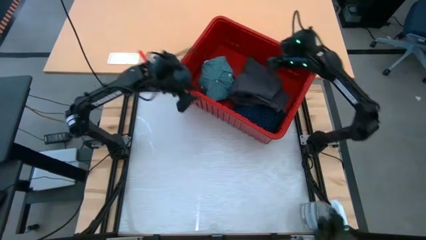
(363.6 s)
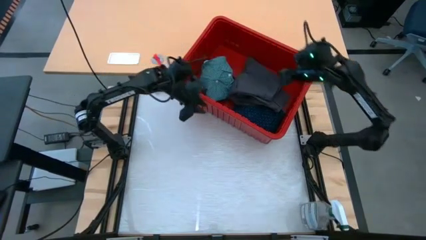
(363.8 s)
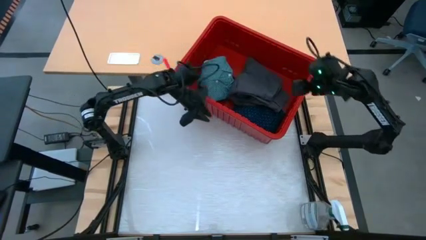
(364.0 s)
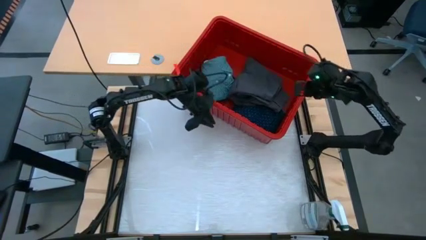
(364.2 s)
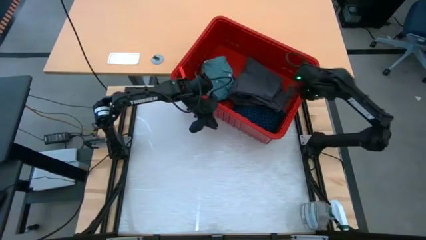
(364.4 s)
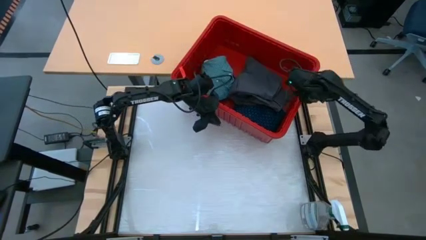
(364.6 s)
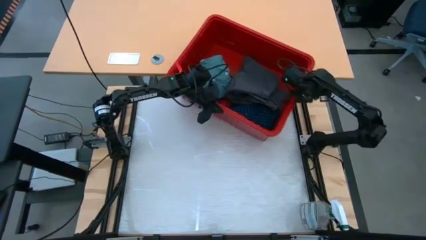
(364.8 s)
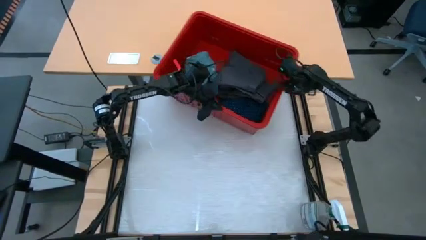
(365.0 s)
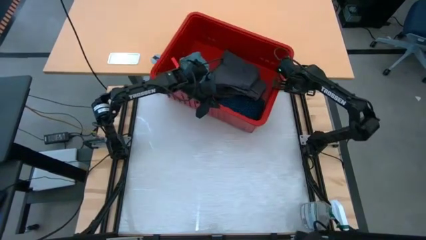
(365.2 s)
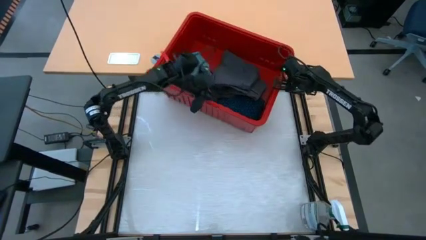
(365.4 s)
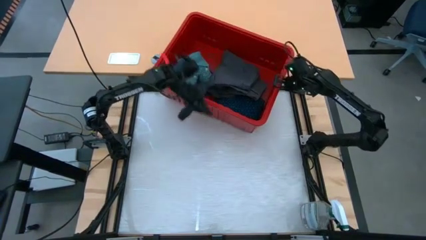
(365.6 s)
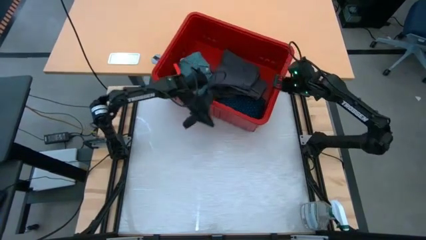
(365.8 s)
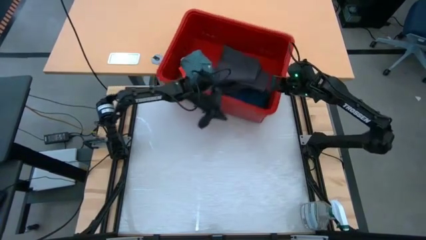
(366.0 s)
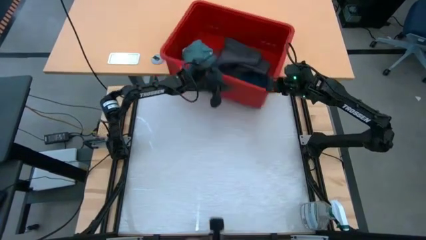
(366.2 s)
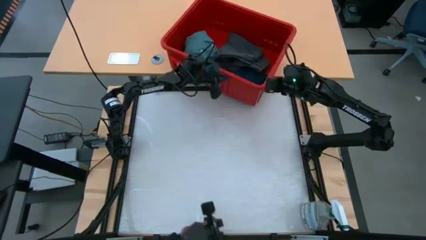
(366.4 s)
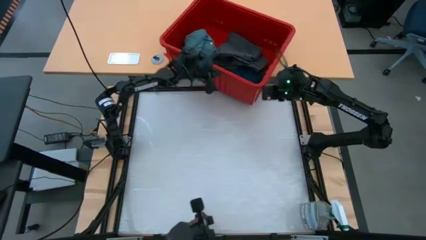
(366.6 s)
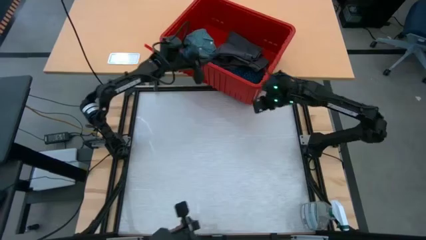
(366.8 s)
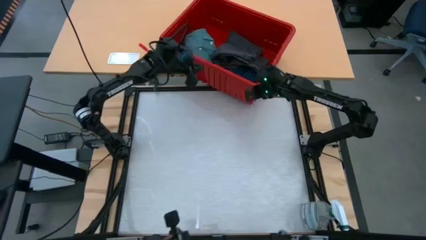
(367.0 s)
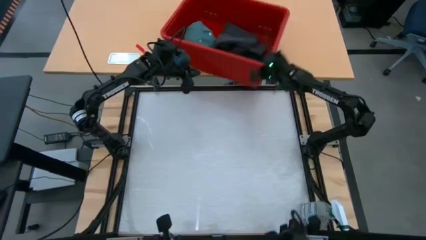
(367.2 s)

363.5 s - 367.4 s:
Task: Fold laundry
Adjust the red bin

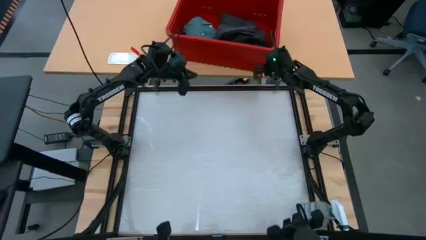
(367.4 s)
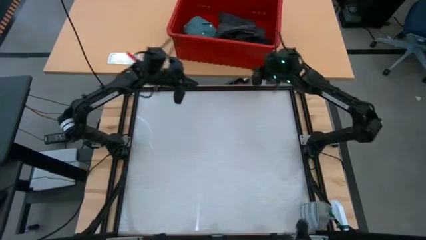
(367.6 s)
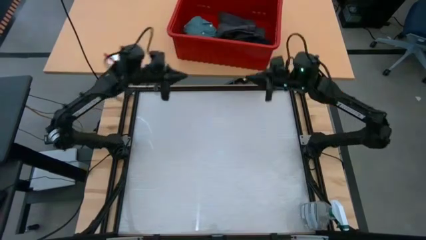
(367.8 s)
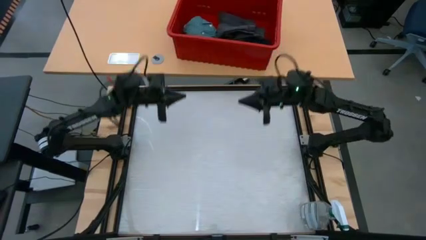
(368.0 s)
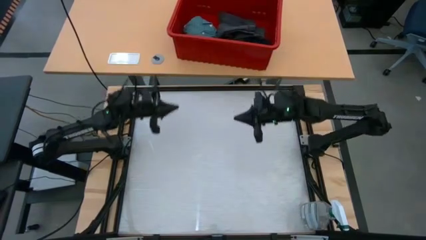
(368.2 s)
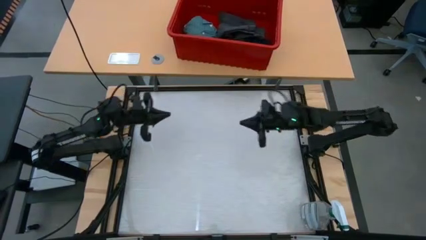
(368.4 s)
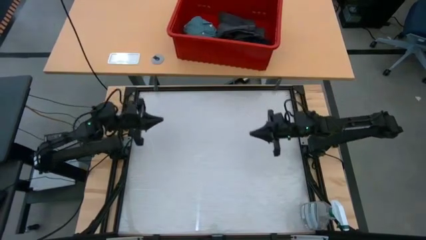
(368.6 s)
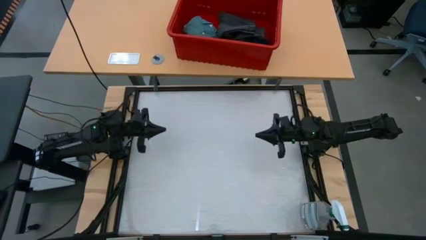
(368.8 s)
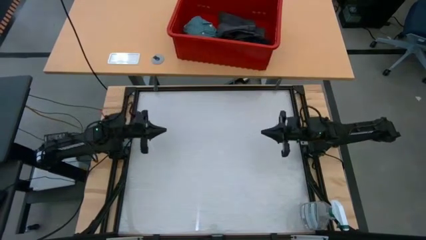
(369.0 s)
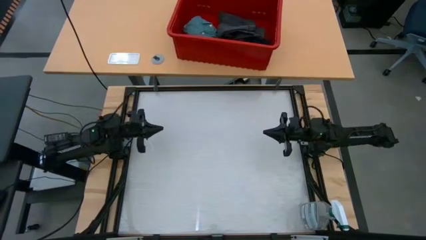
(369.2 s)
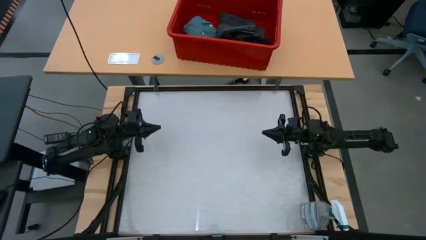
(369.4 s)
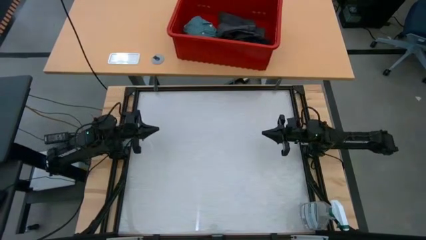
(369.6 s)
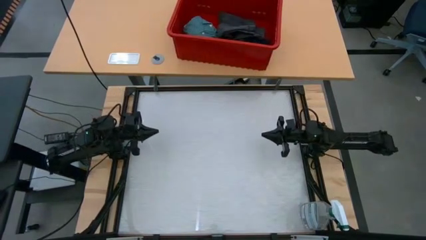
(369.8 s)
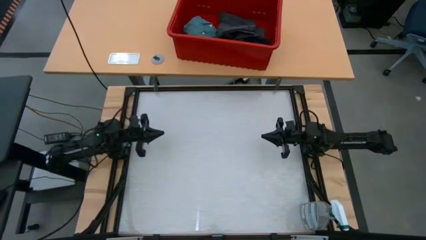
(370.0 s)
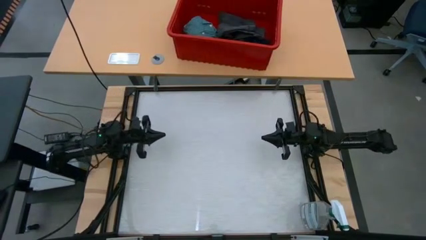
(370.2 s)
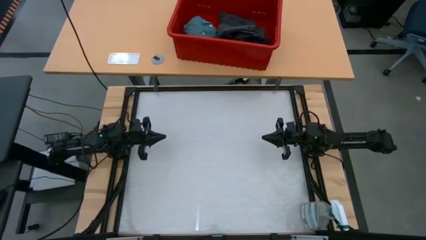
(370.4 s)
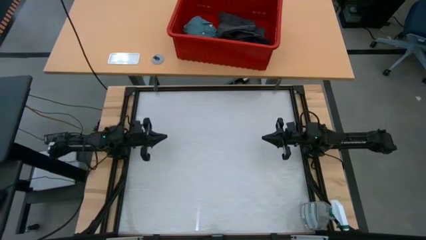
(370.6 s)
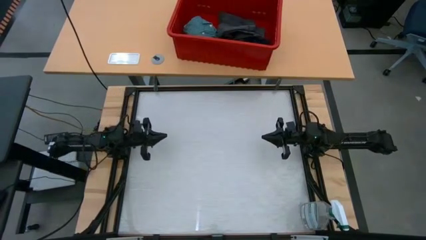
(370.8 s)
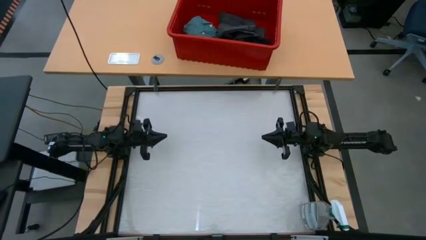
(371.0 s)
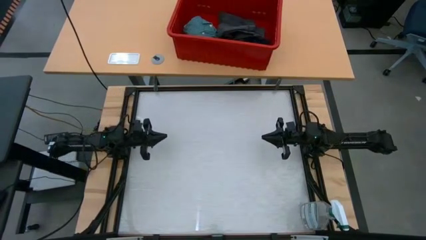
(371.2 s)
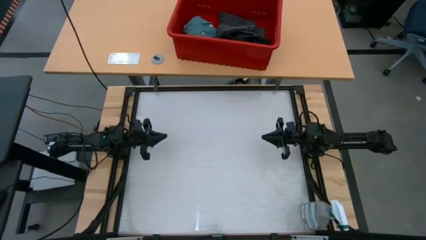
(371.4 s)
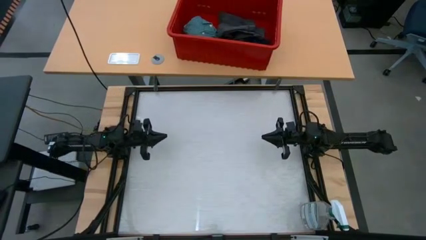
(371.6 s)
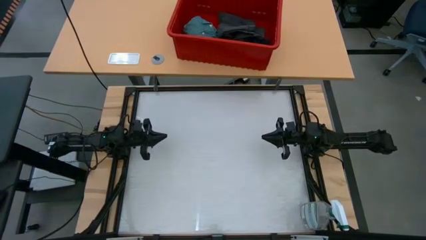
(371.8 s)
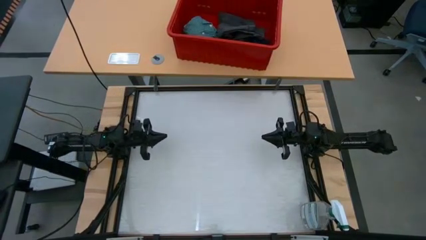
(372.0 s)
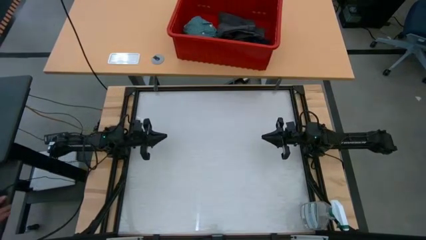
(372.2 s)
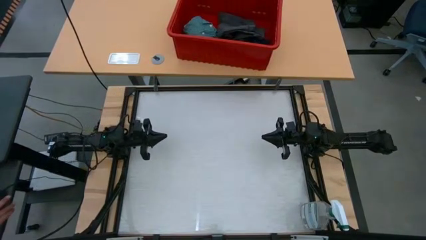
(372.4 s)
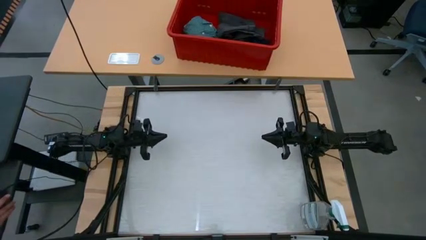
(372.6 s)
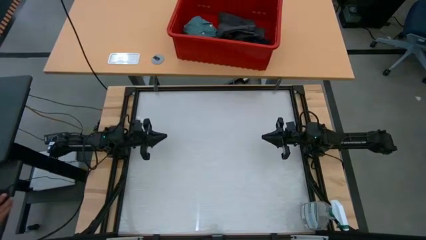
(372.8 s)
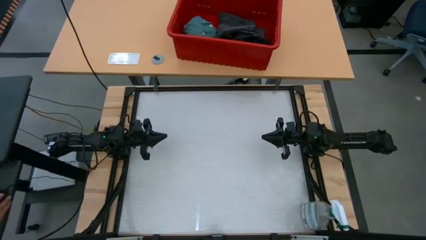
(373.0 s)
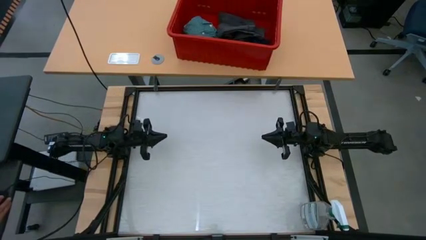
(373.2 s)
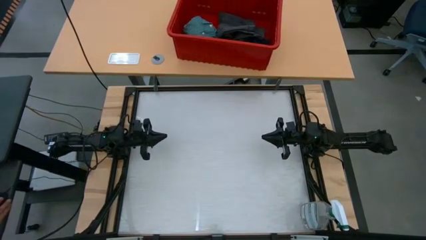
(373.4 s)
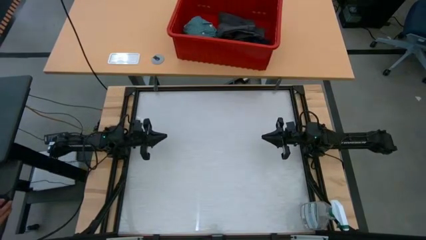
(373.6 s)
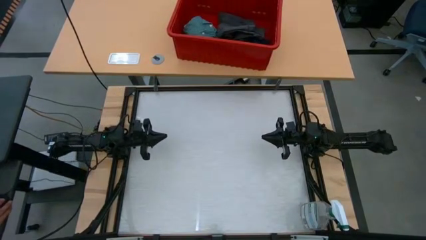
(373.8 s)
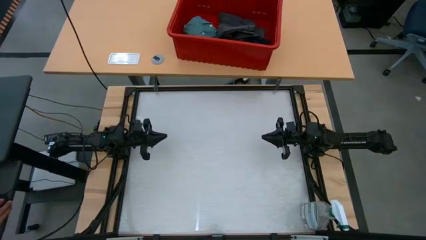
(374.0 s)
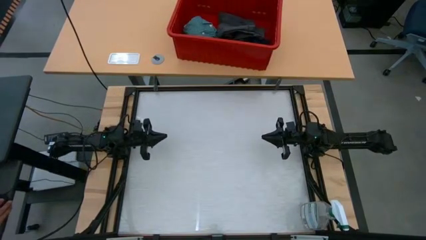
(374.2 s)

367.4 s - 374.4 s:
Return to Home Position

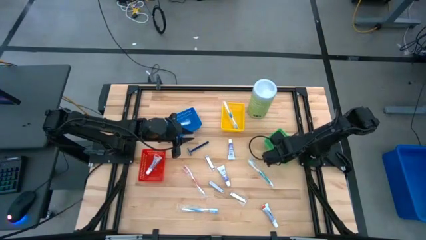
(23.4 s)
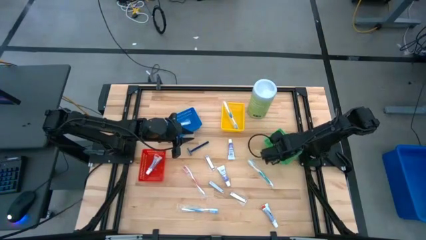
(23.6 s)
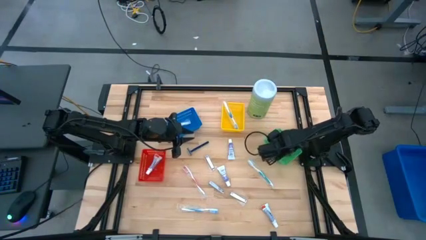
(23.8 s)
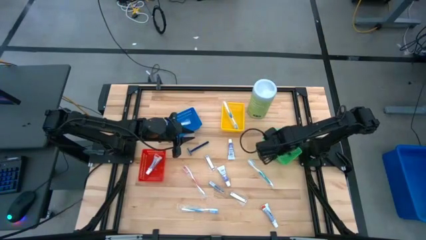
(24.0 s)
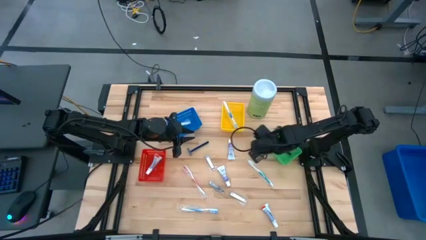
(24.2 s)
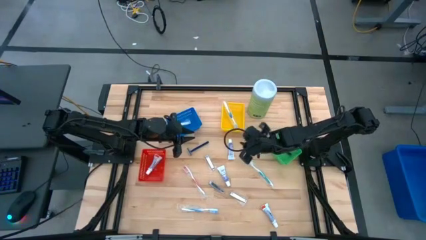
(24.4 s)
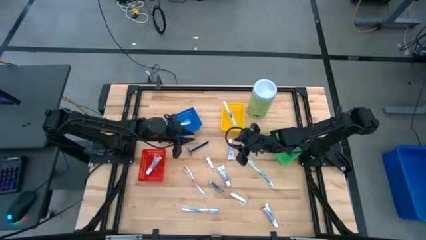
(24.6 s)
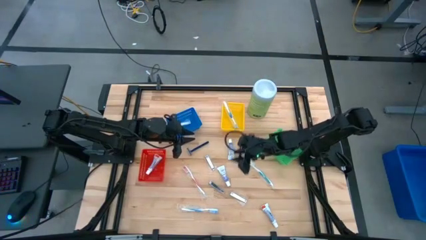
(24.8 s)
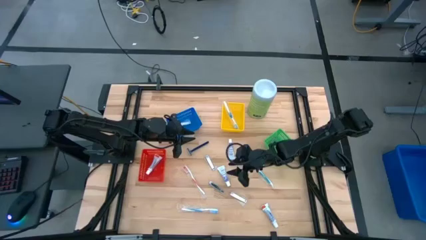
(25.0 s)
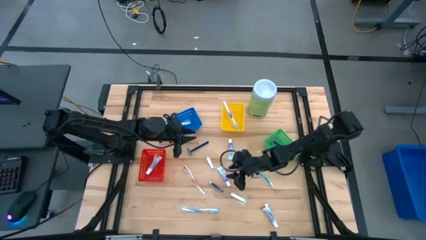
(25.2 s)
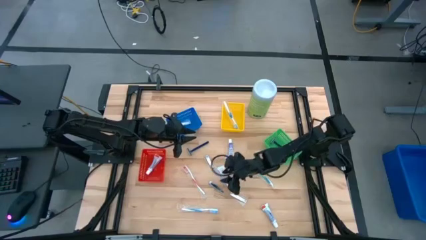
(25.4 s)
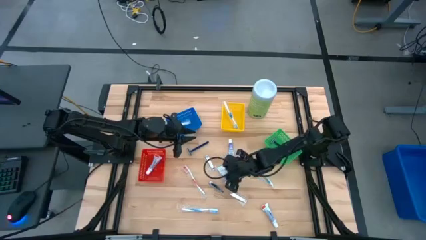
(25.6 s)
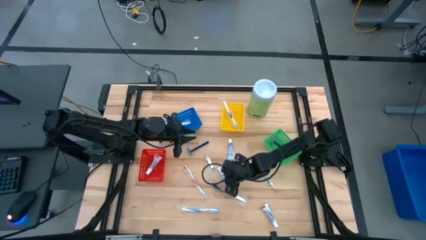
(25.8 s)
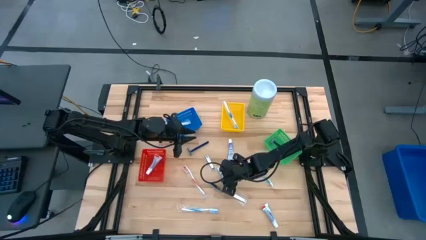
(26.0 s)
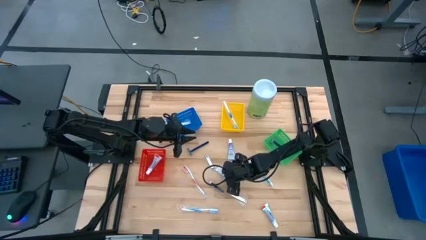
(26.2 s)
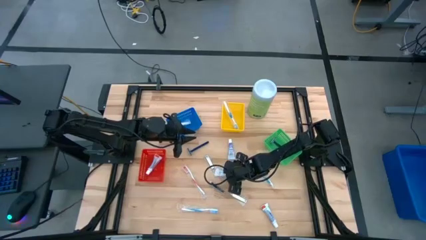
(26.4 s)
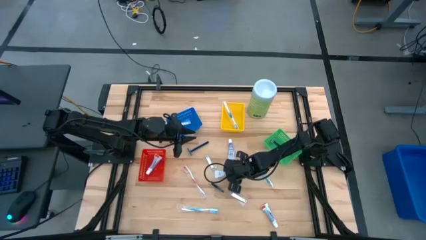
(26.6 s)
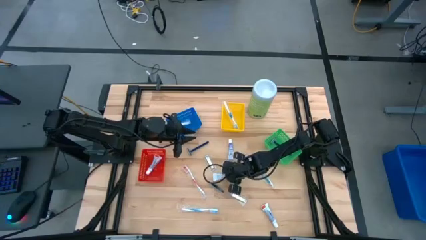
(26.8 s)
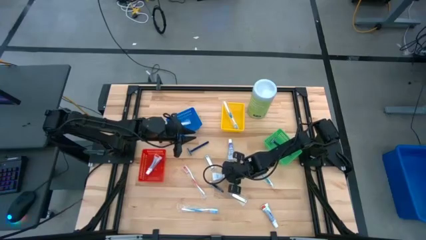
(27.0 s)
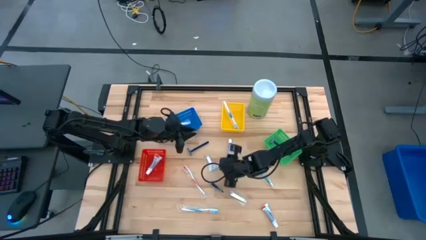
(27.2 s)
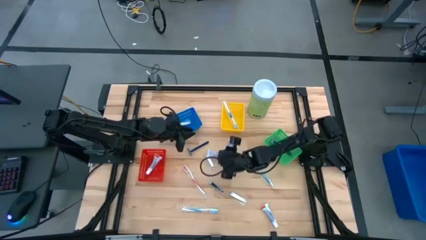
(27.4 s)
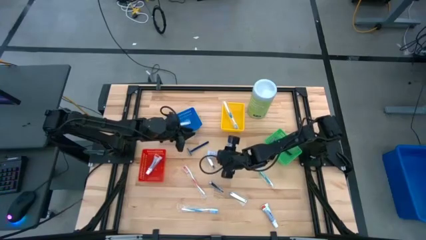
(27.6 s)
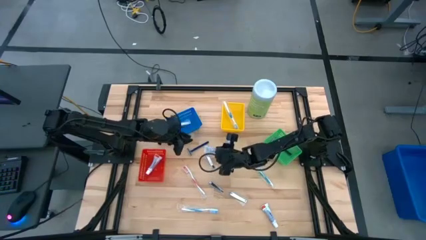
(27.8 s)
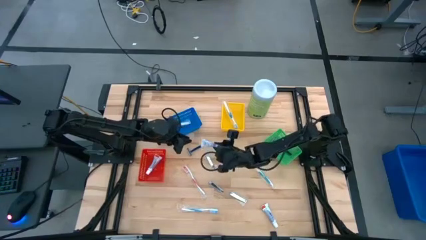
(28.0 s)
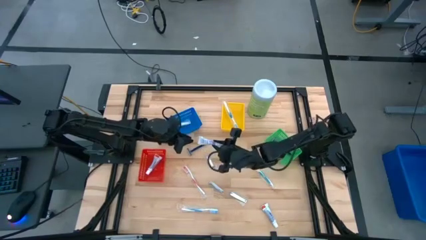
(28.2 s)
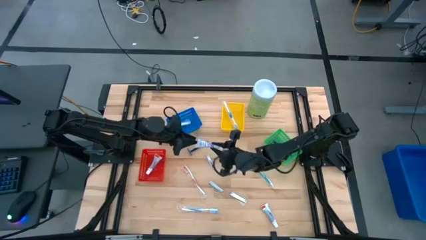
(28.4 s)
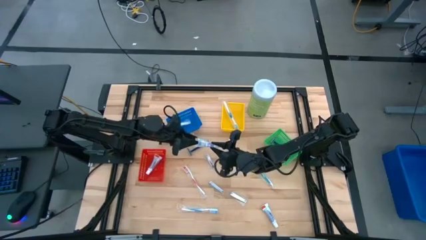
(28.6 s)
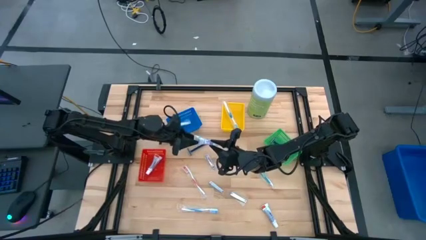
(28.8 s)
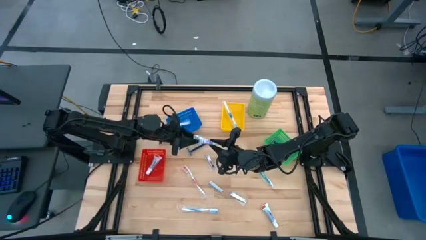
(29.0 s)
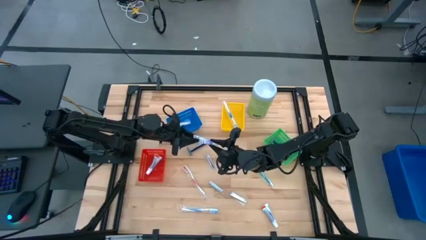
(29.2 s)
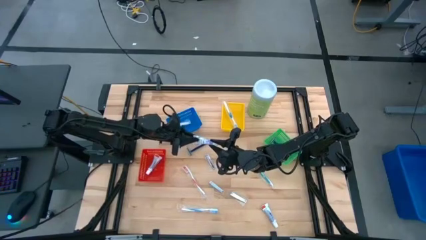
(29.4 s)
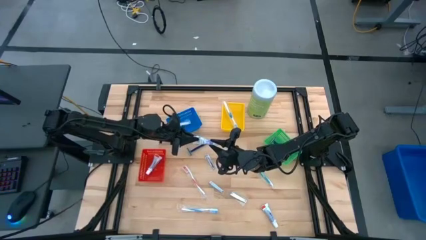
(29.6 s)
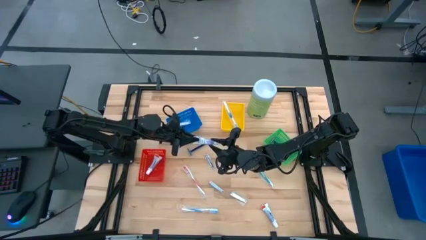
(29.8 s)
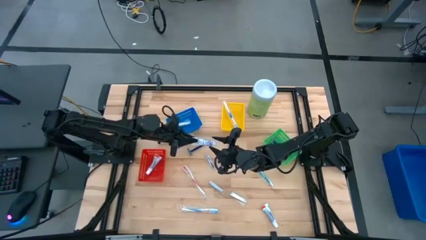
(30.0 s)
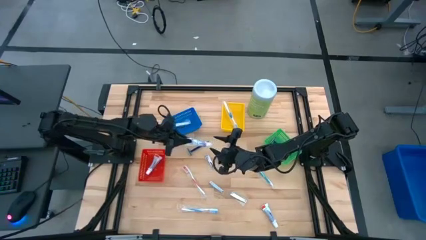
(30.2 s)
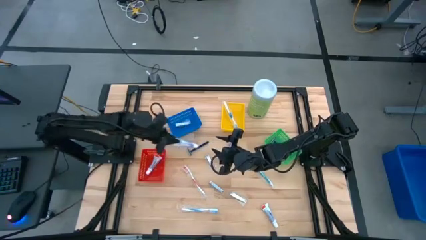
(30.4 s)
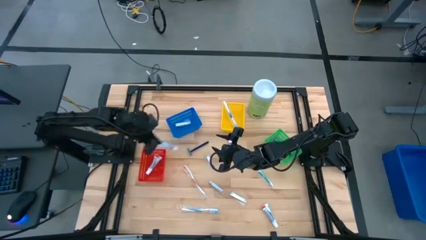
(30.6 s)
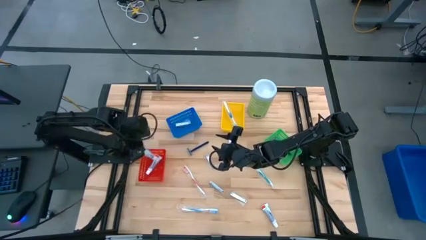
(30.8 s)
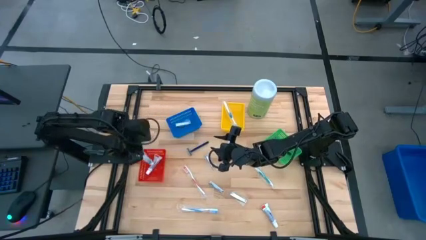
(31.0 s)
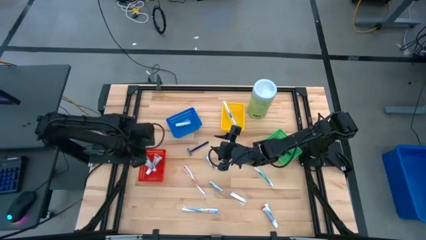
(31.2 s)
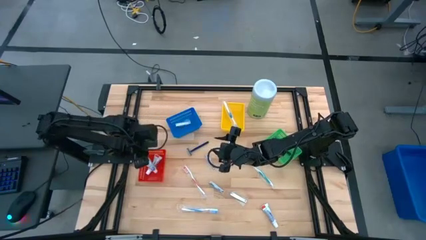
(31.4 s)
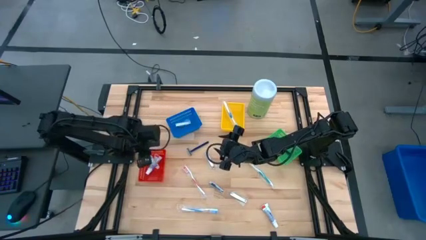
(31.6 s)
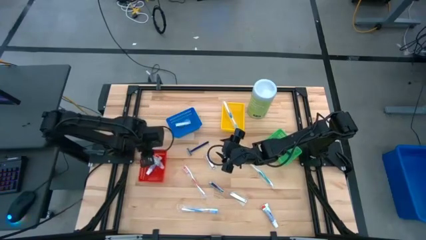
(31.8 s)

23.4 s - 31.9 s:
Task: Pick & Place Travel size toiletries
Put the white toothpaste into the red basket
